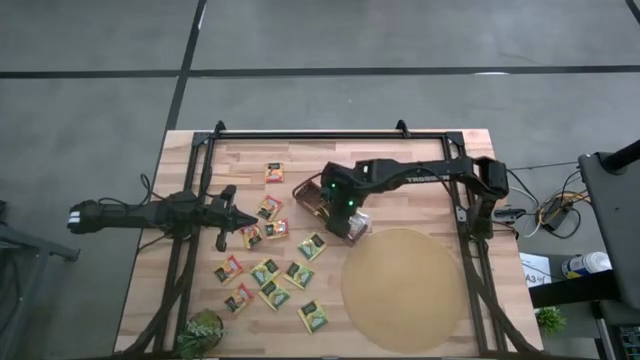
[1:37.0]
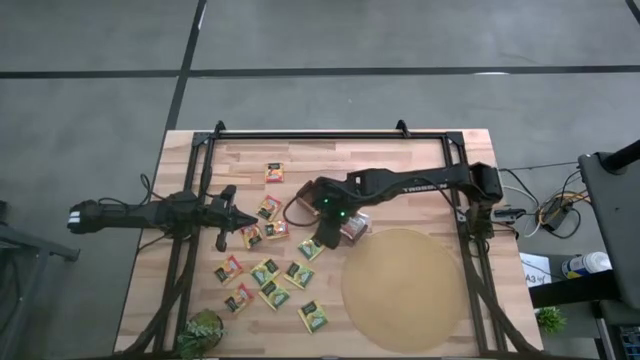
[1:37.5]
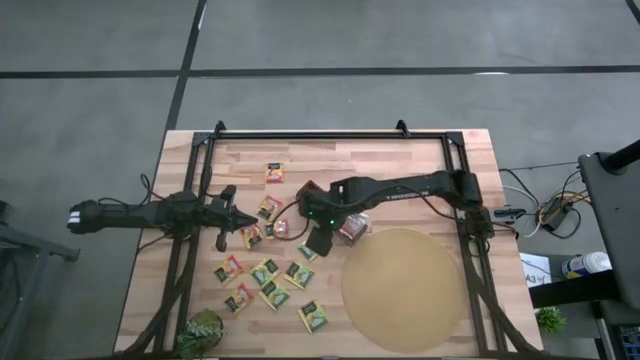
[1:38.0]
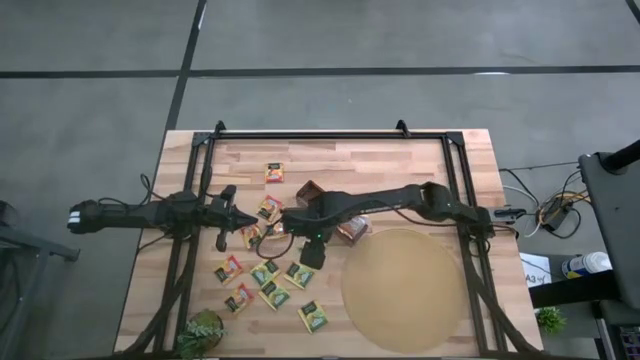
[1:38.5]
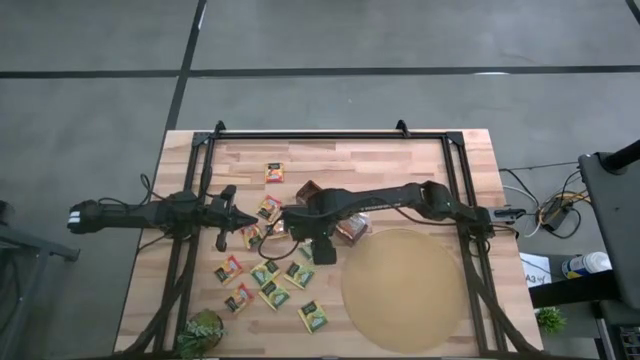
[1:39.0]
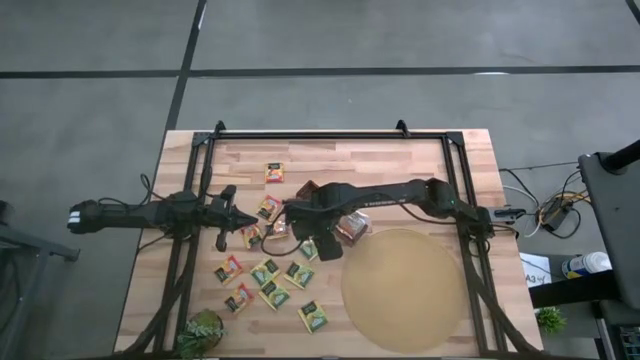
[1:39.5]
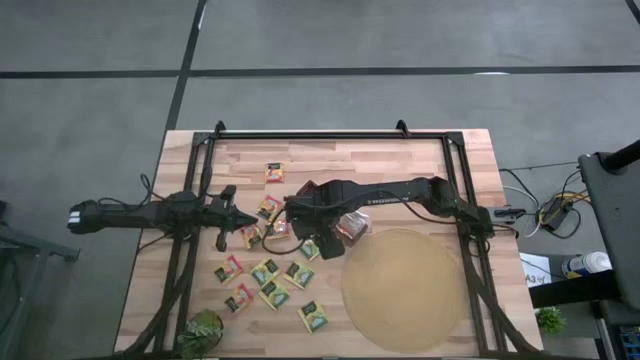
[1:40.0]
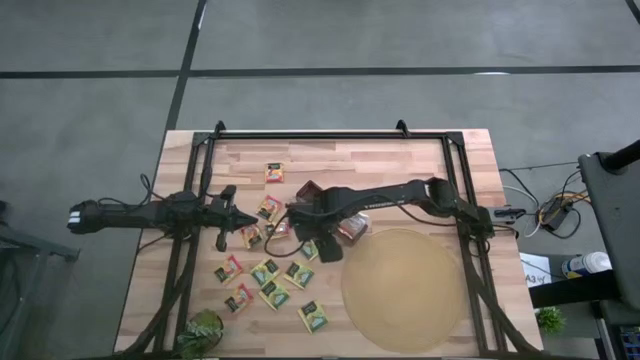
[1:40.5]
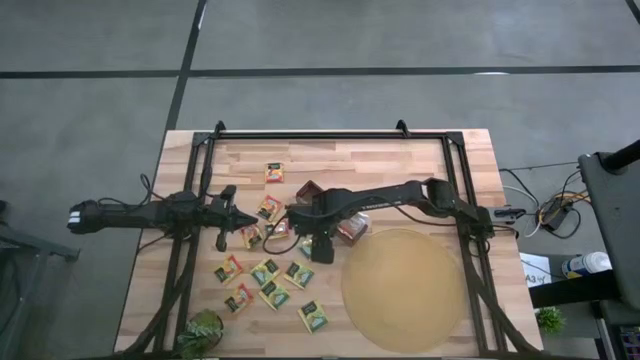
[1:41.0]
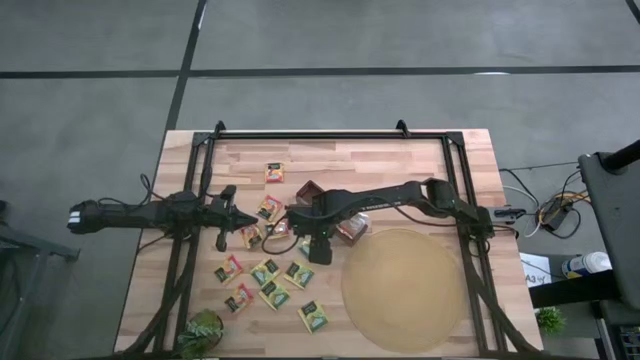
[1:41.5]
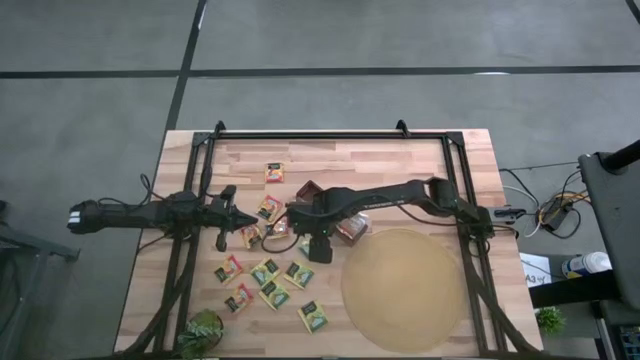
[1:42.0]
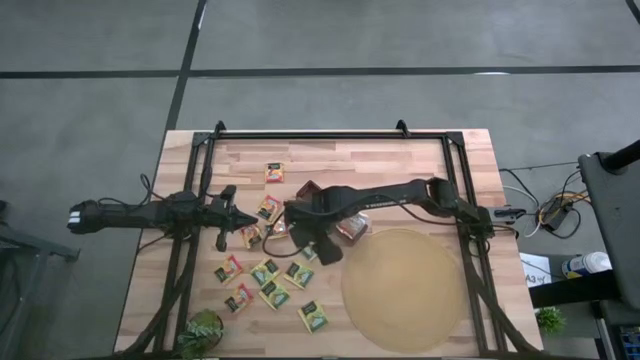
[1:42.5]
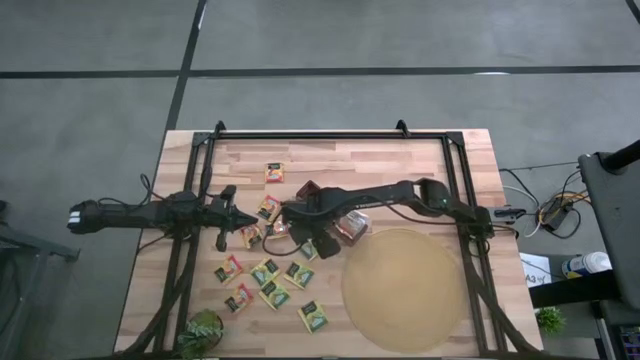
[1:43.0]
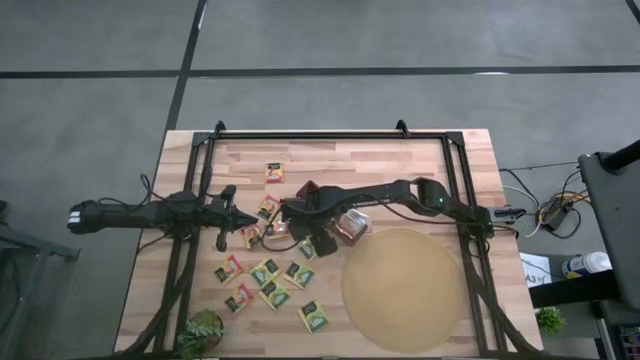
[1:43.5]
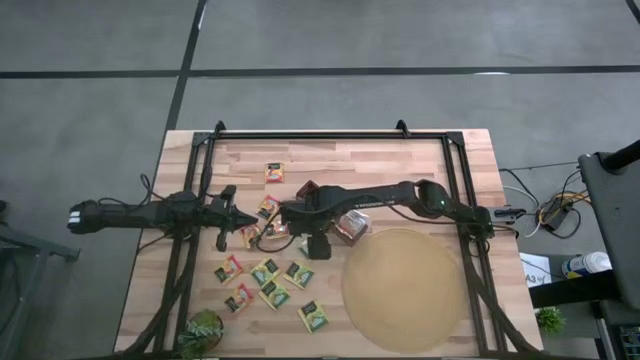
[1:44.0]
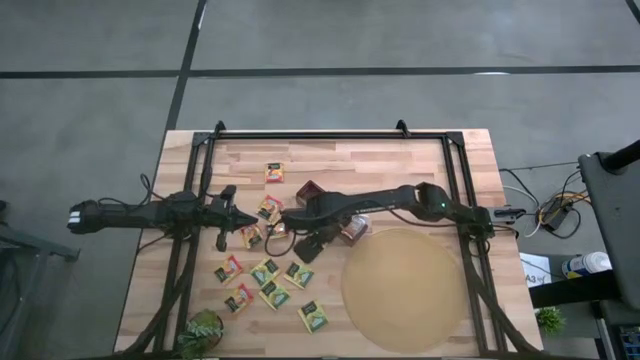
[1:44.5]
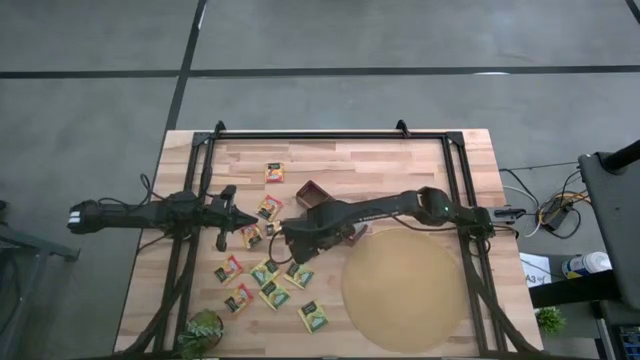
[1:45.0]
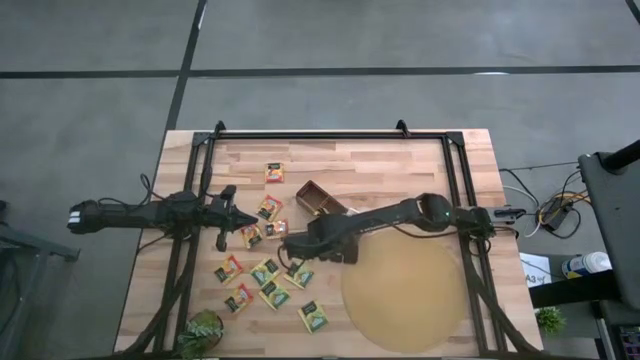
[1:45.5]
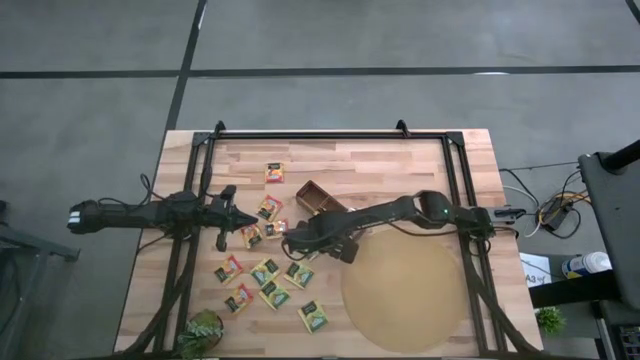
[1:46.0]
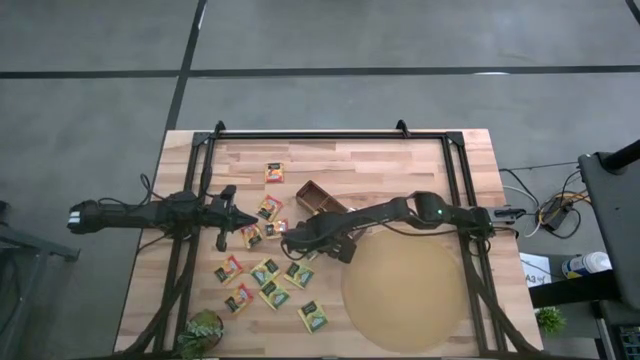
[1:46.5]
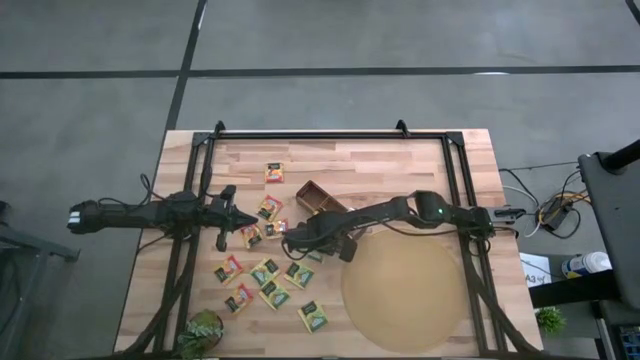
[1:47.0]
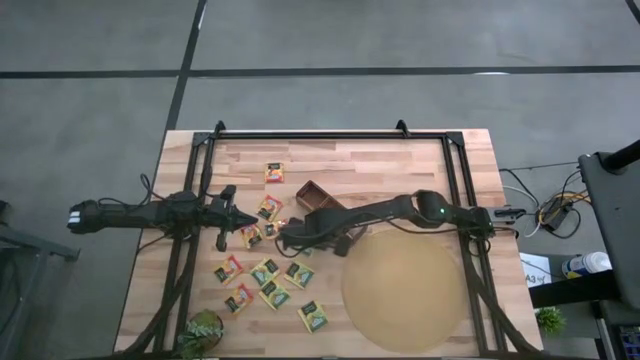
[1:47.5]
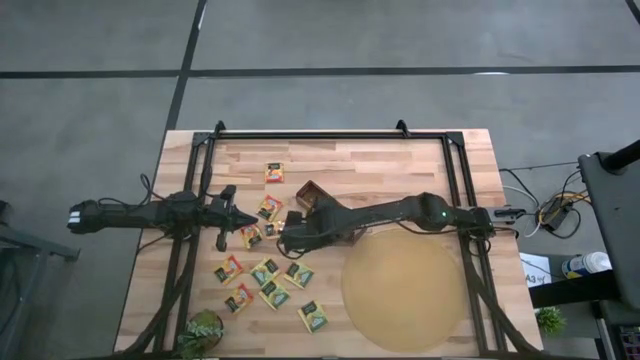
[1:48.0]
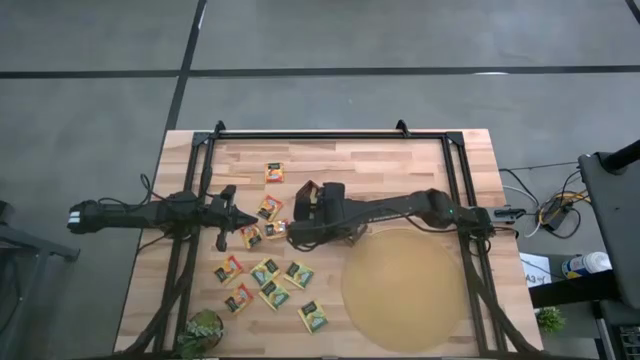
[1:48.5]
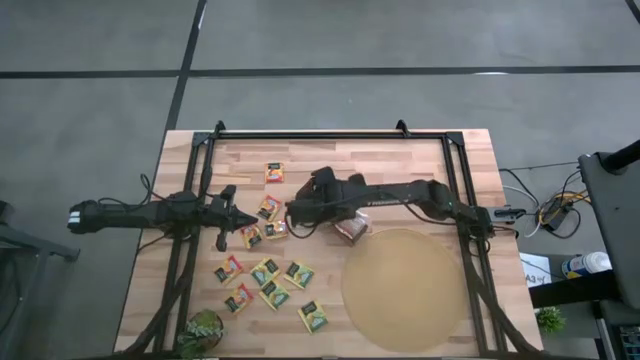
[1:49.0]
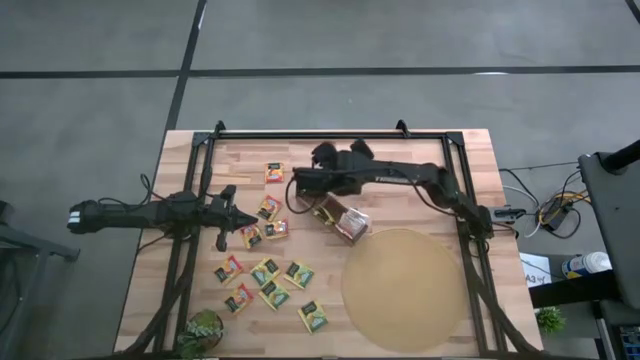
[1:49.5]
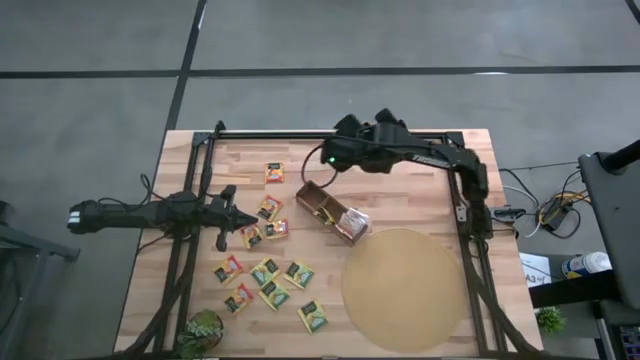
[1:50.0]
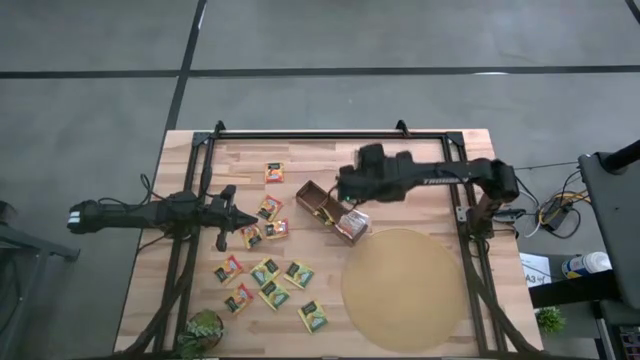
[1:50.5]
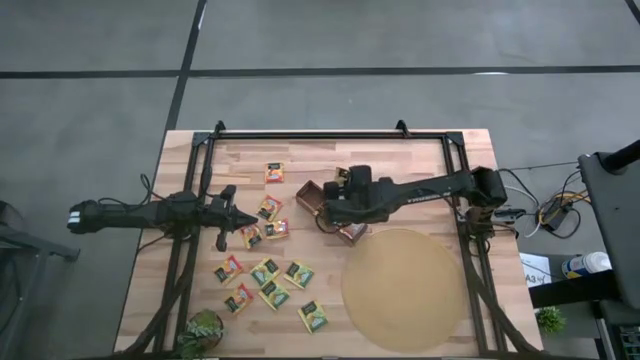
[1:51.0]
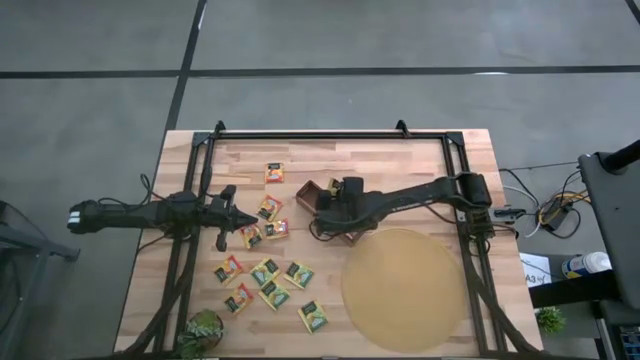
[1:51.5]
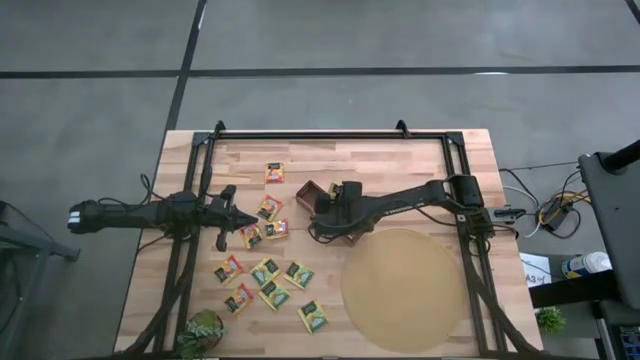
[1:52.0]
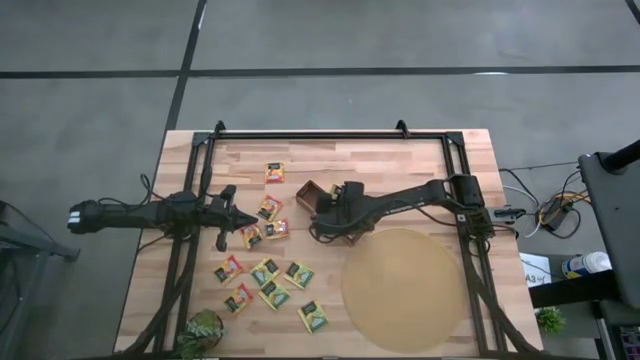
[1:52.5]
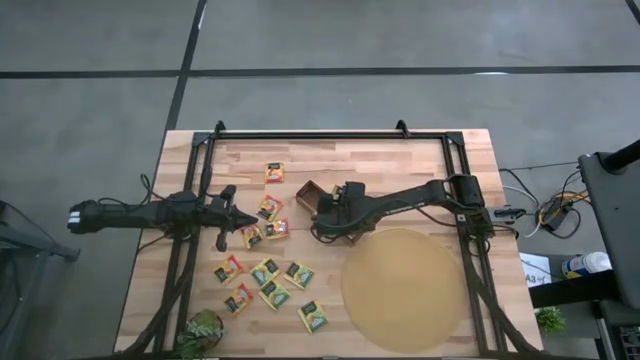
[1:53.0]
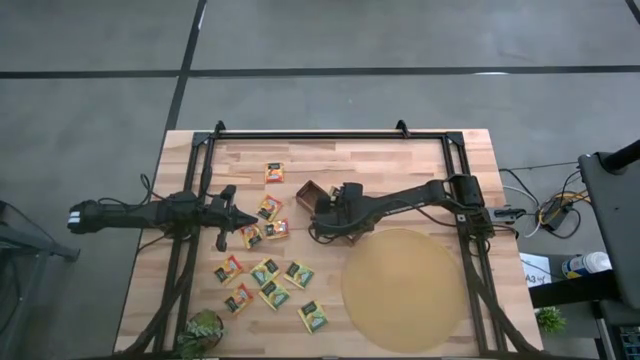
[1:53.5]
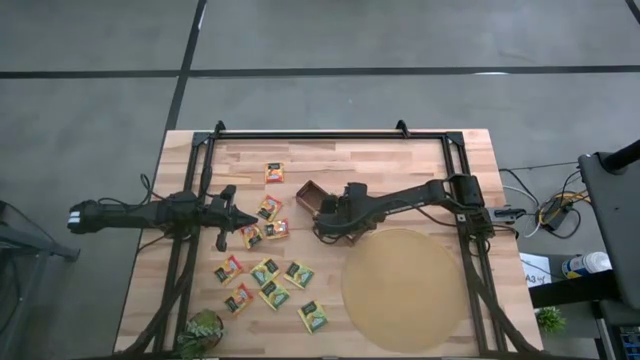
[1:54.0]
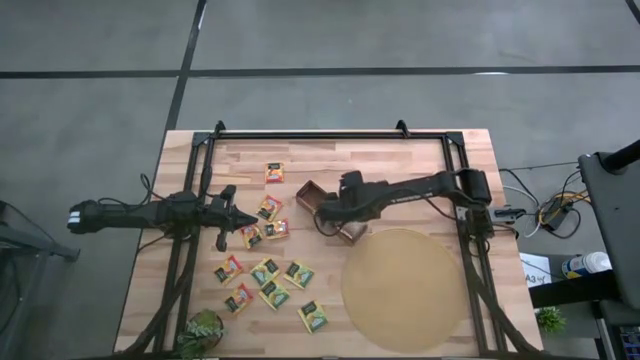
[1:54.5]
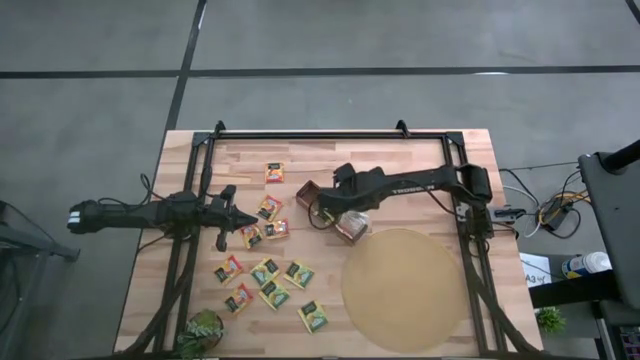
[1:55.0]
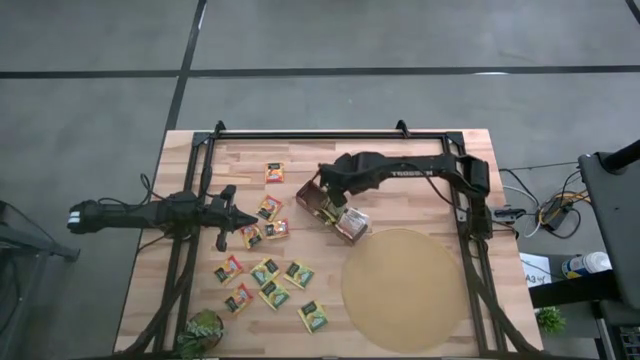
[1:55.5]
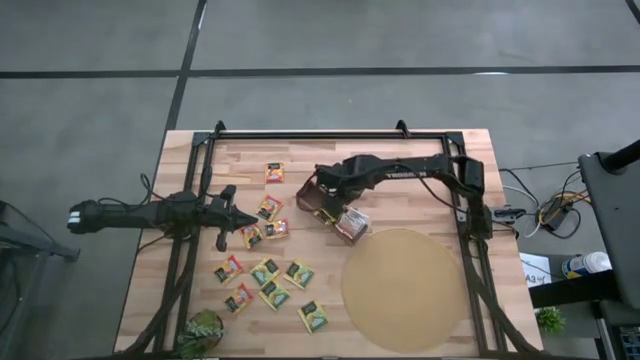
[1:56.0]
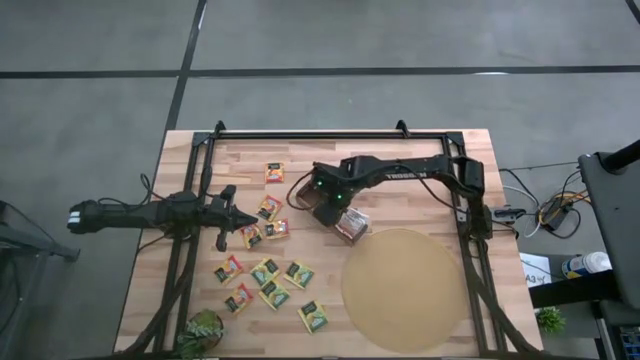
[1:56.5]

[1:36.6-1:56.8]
Task: Pick & Place Tea
Put the yellow tea bag into the middle section of the wooden organizer

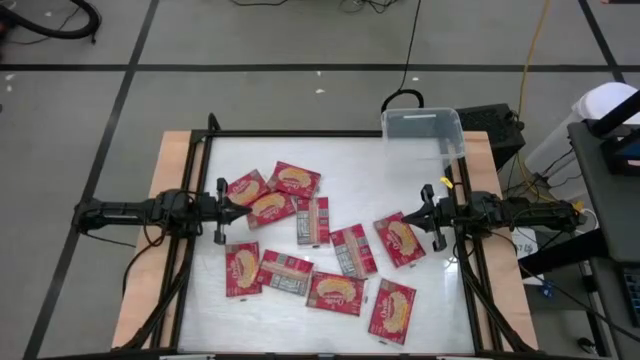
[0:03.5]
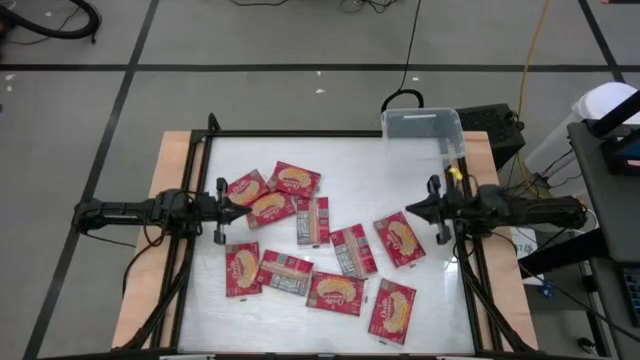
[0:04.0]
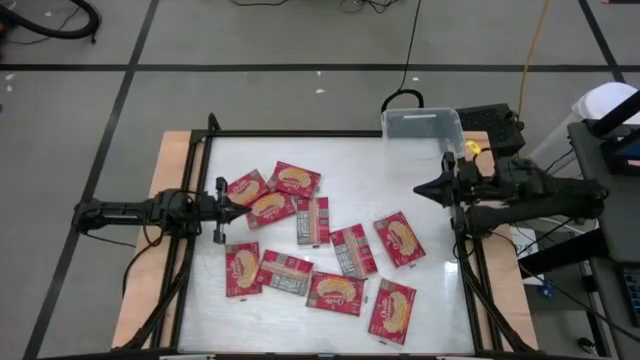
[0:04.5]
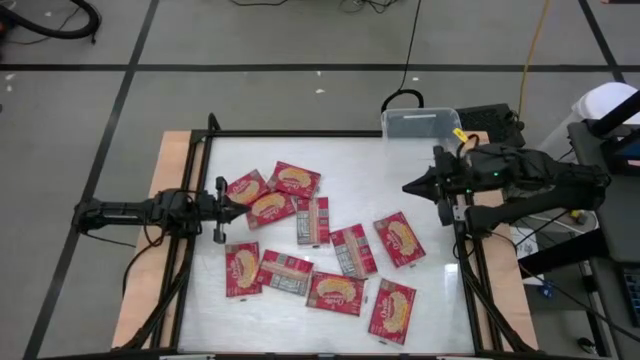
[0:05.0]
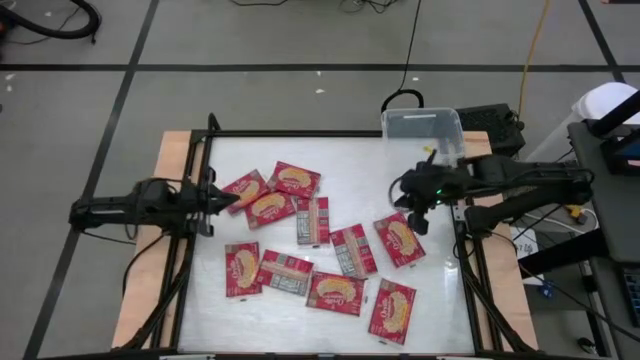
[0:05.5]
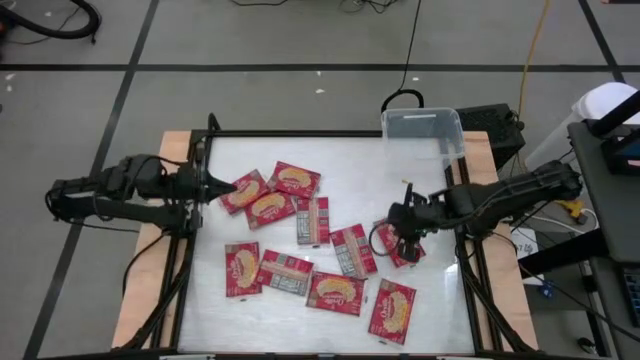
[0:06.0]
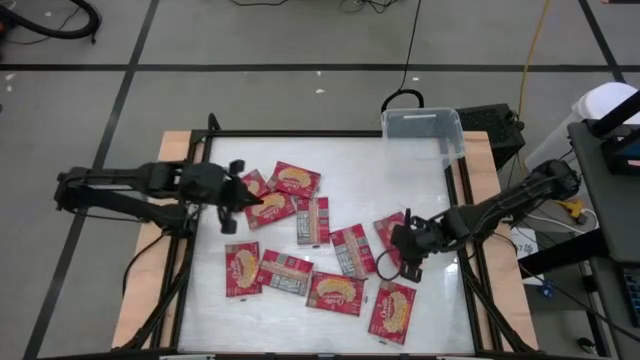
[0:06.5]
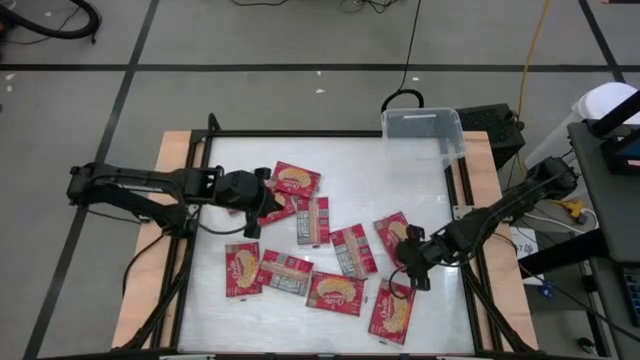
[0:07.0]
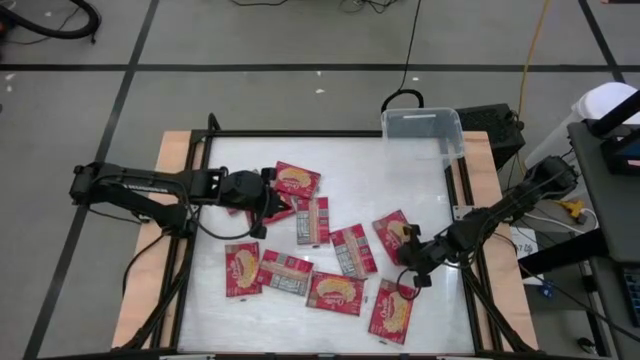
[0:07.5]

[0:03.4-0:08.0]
Task: Sort popcorn bags into baskets
Put the red popcorn bag into the transparent bin
